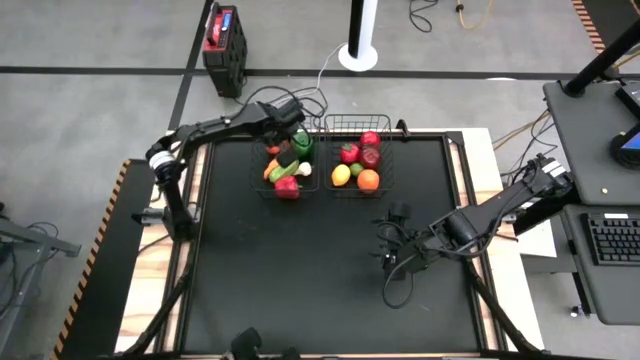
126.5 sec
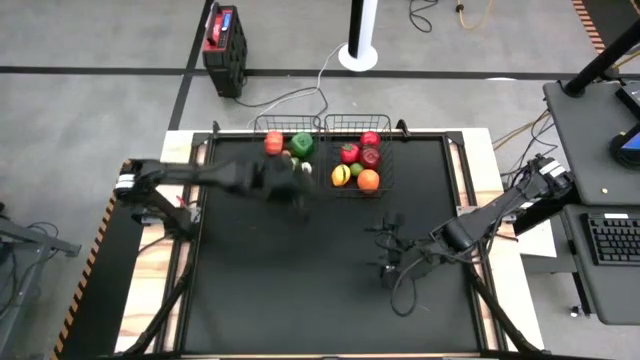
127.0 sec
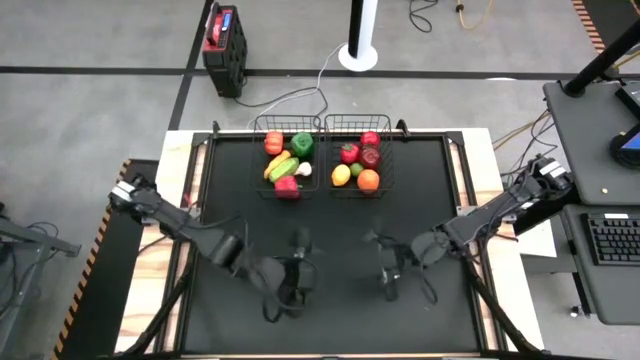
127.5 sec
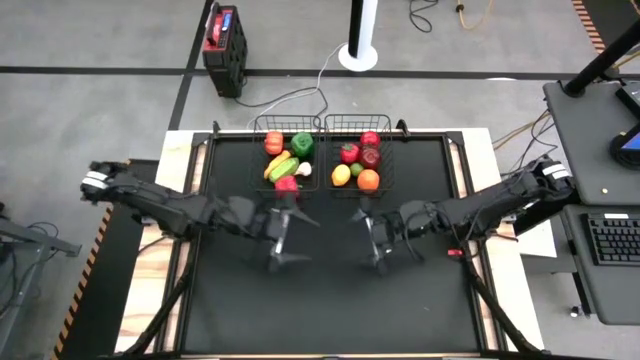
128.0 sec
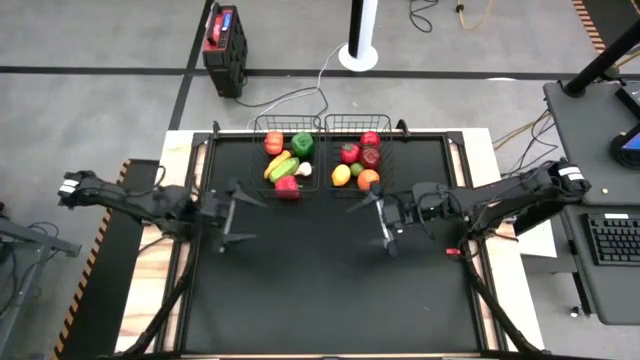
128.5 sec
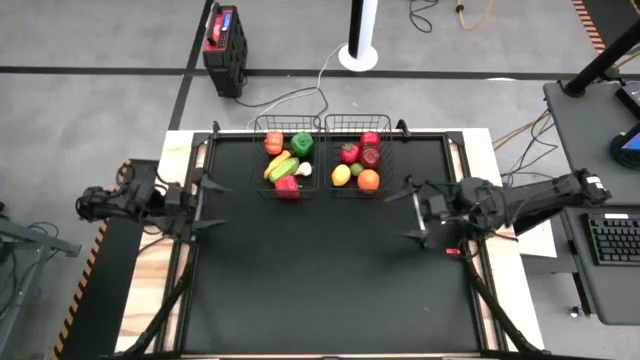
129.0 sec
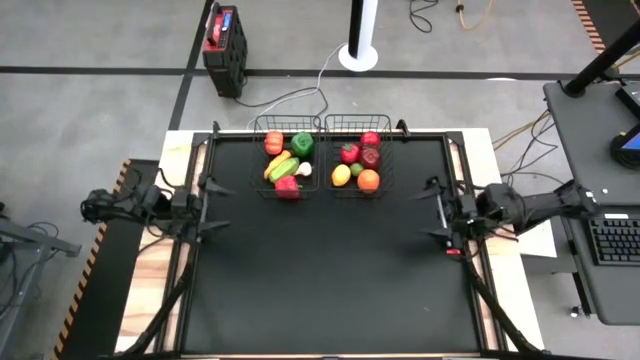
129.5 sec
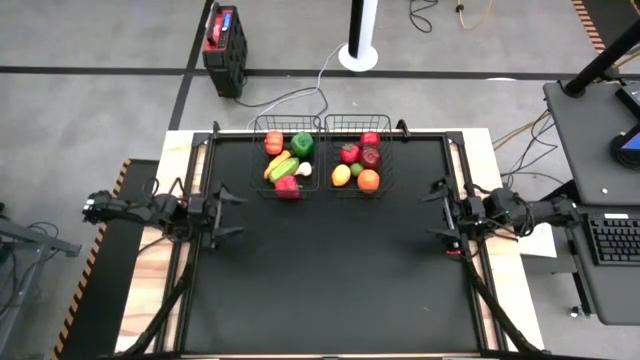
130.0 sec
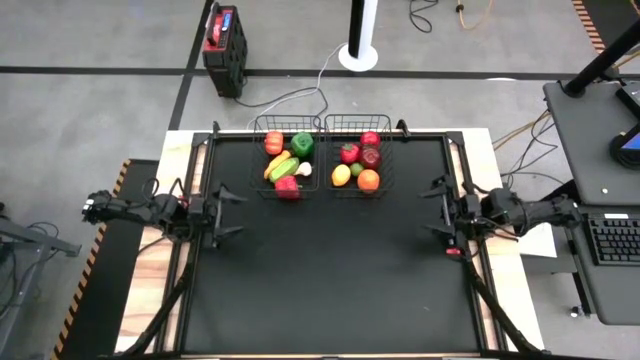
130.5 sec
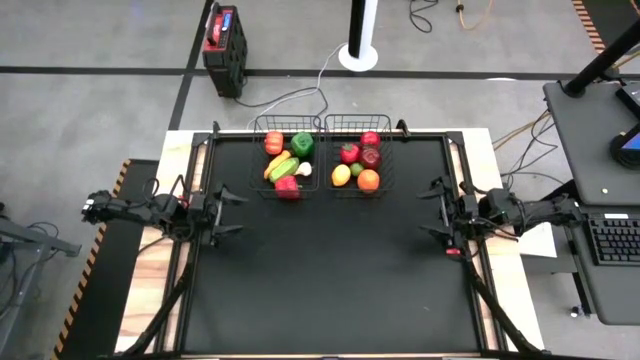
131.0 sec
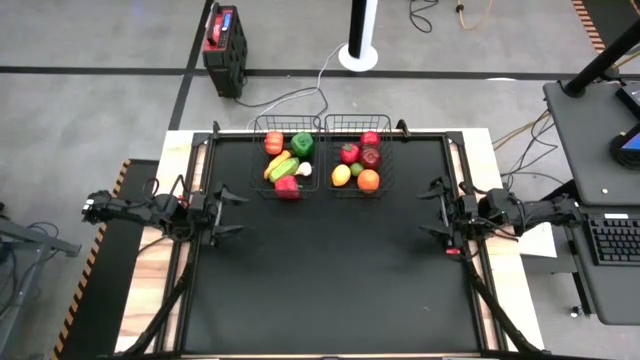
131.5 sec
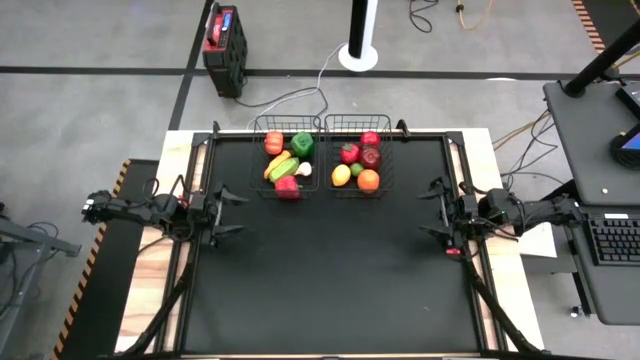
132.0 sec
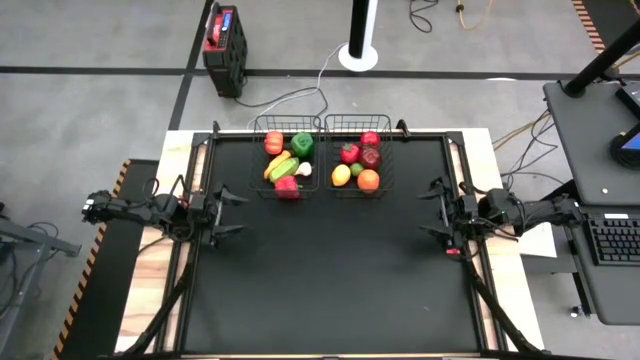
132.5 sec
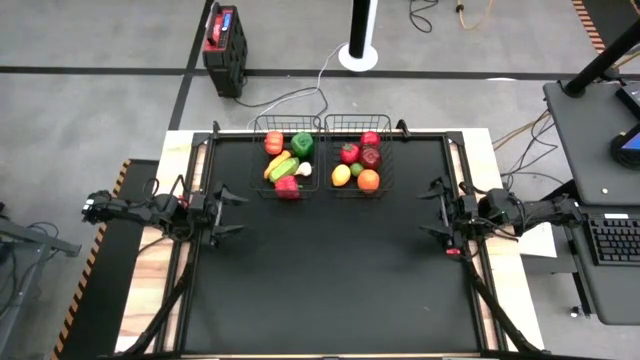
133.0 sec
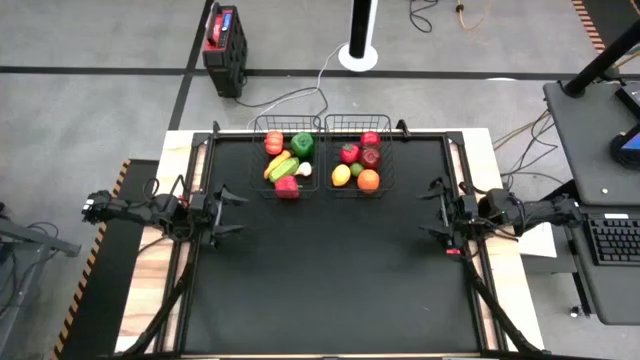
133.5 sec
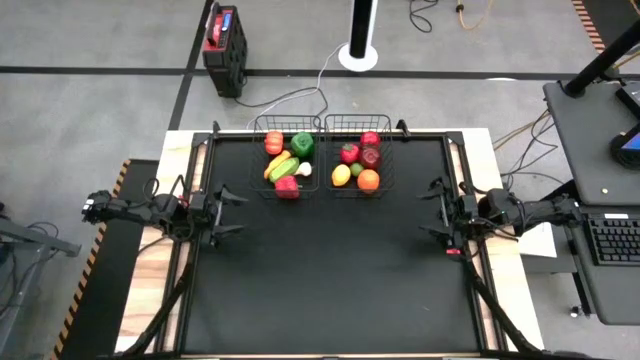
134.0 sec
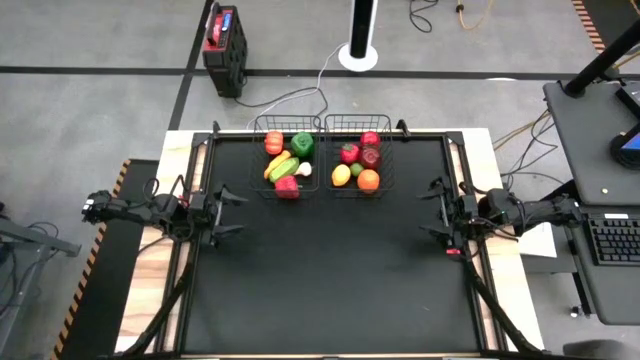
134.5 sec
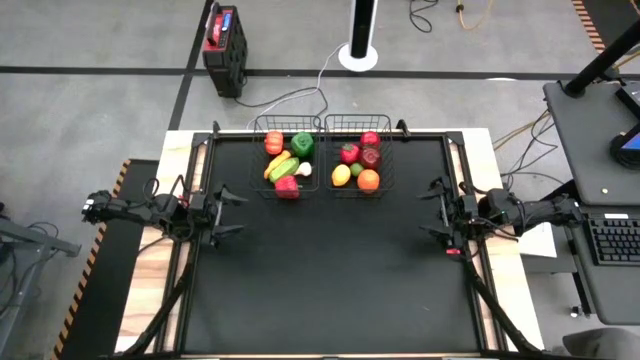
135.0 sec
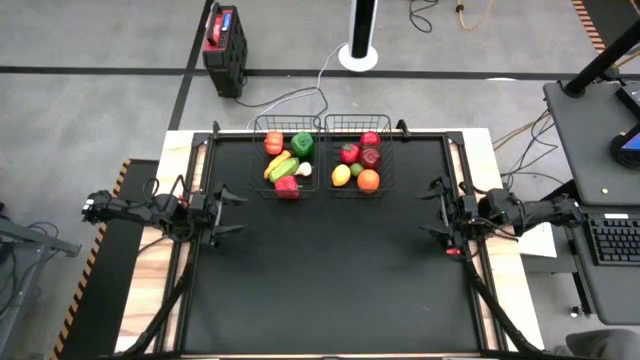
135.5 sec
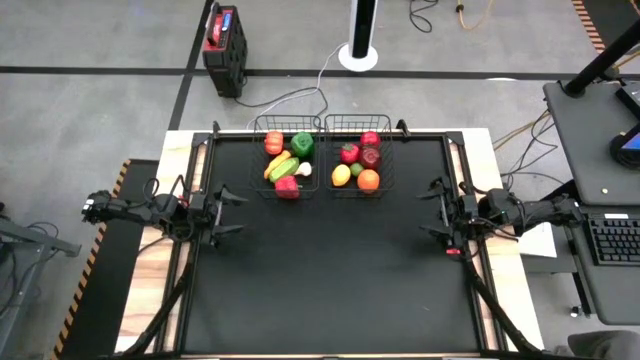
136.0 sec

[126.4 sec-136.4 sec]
Task: Sort produce into baskets
Return to Home Position

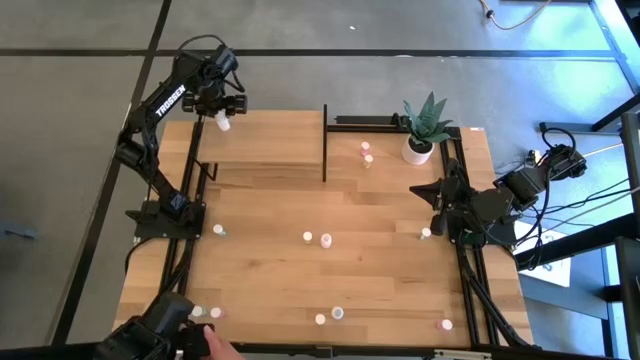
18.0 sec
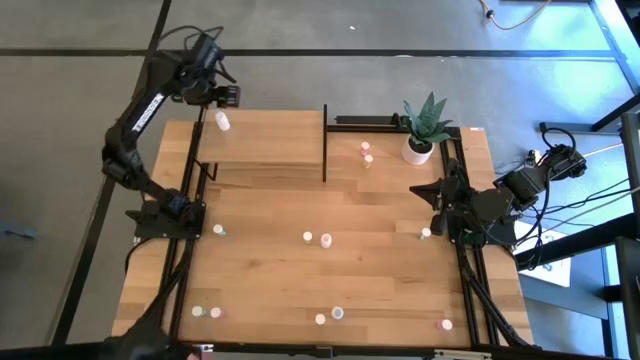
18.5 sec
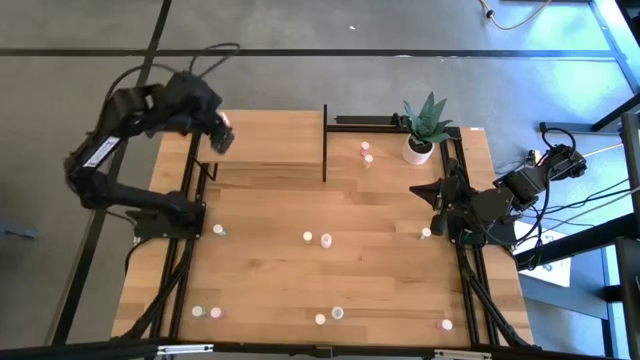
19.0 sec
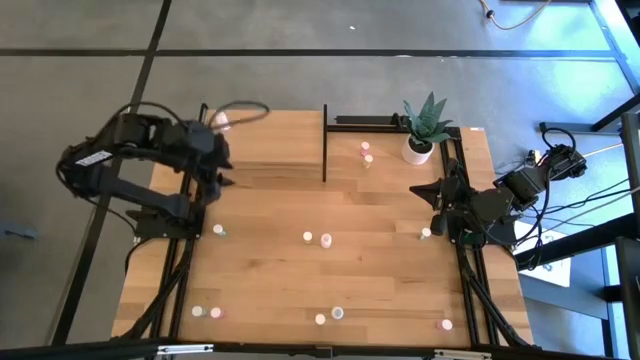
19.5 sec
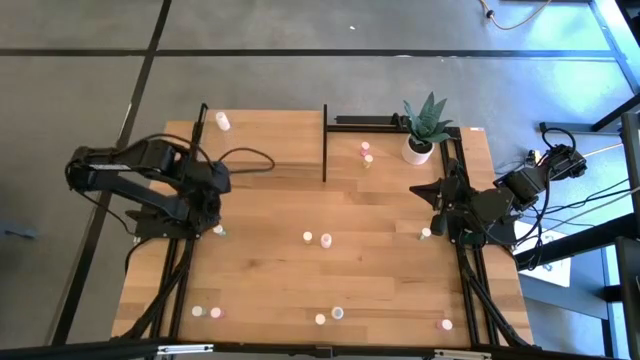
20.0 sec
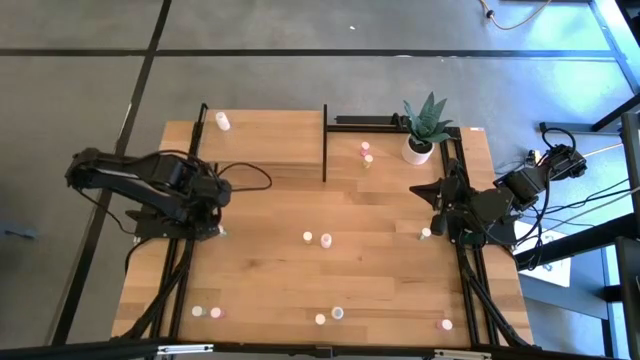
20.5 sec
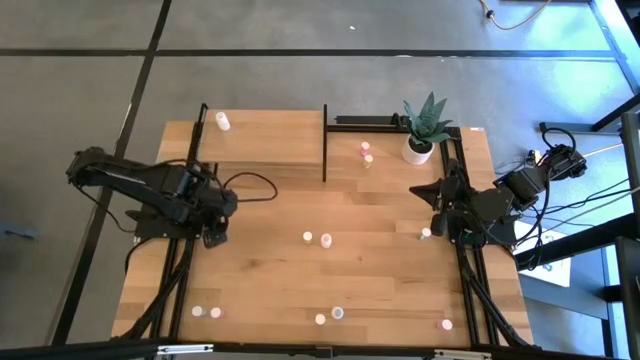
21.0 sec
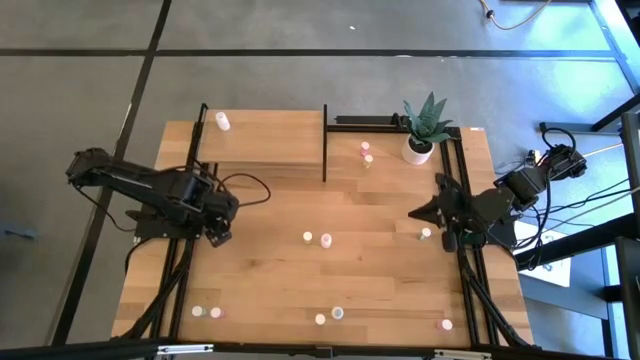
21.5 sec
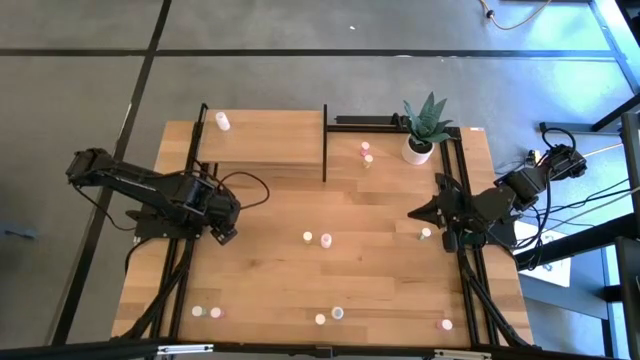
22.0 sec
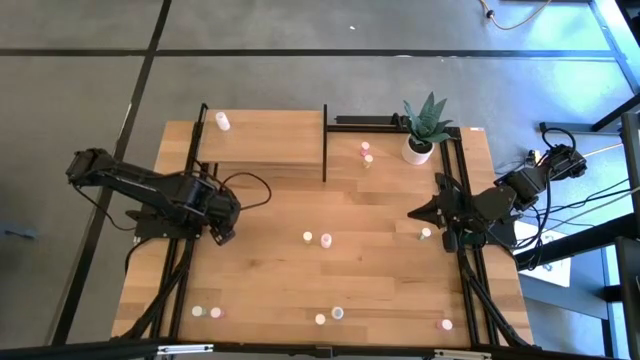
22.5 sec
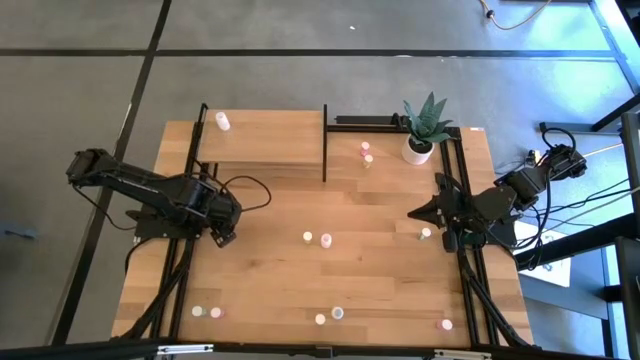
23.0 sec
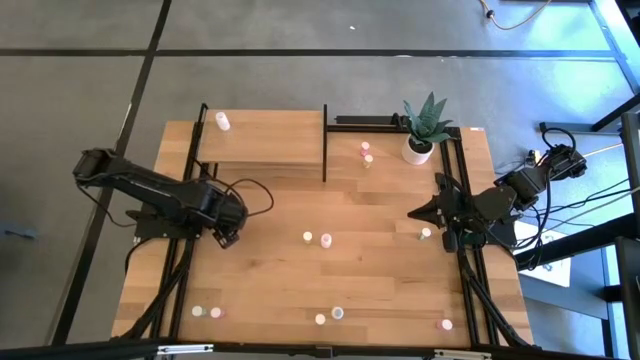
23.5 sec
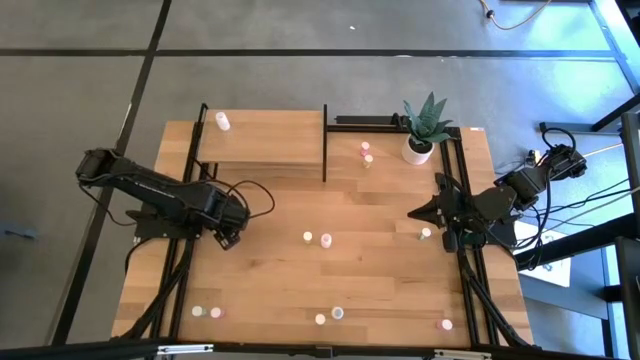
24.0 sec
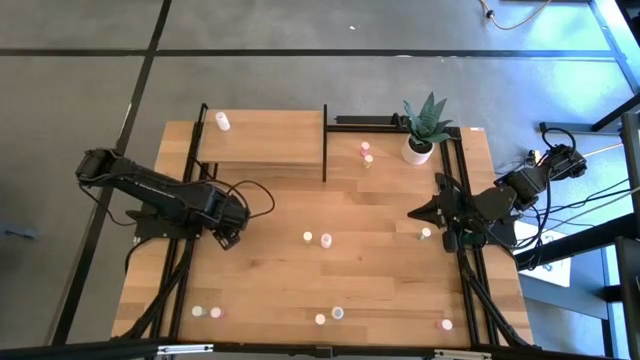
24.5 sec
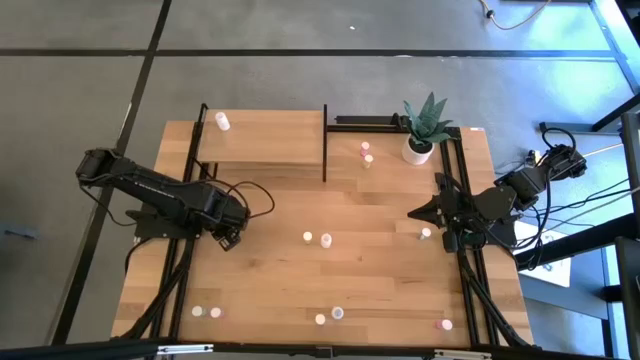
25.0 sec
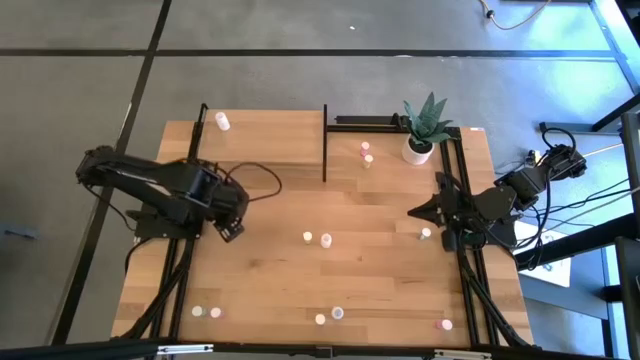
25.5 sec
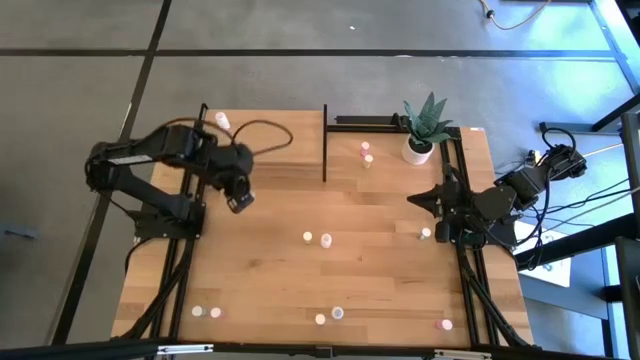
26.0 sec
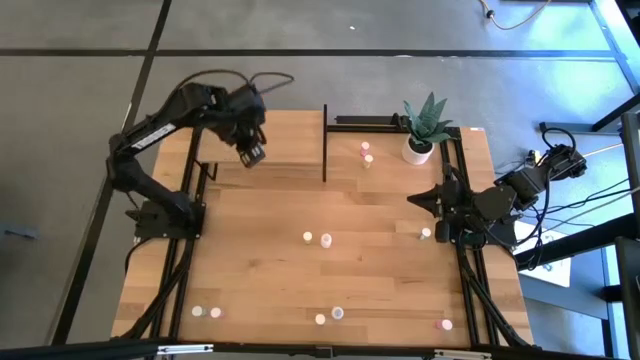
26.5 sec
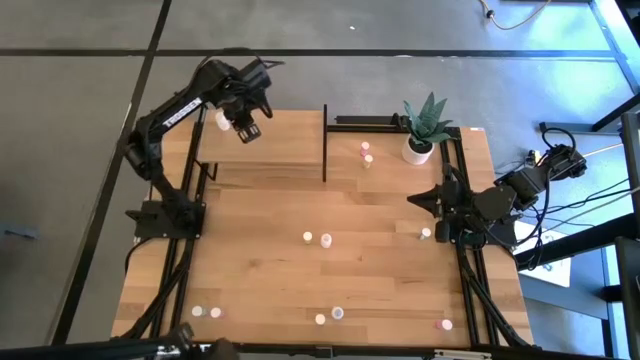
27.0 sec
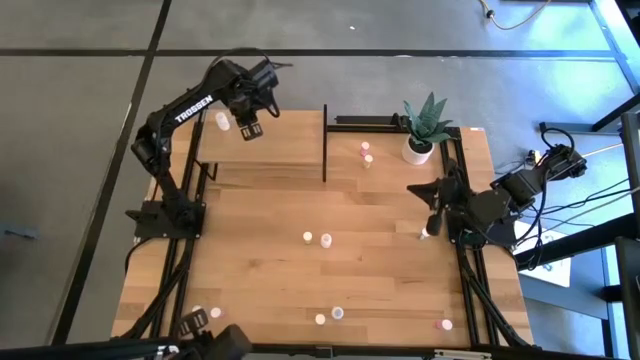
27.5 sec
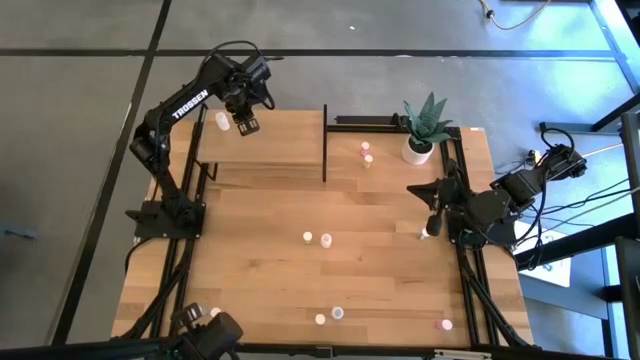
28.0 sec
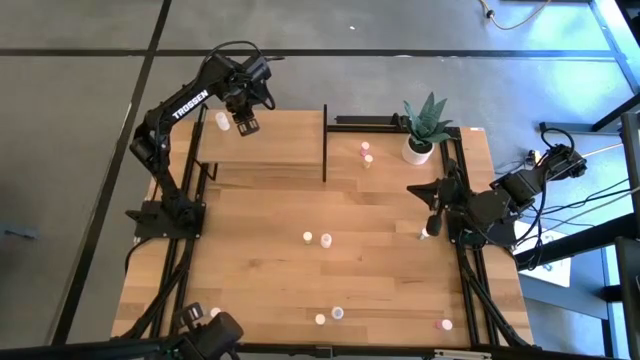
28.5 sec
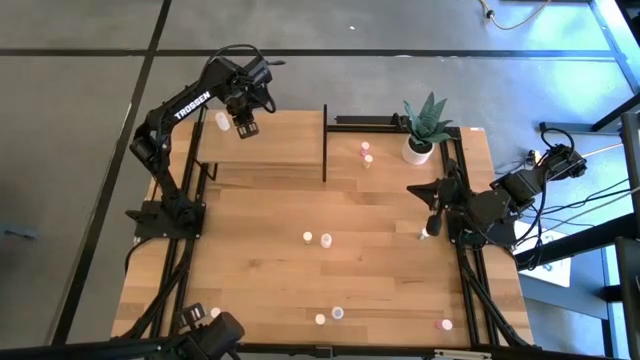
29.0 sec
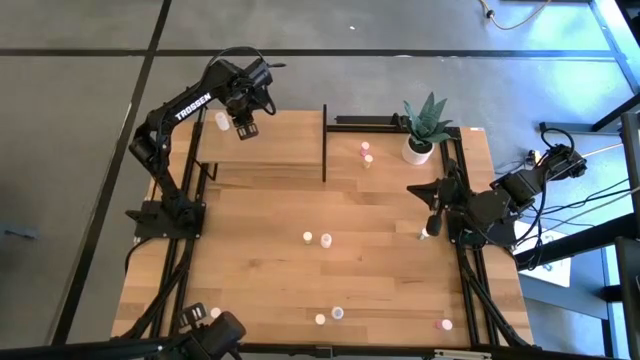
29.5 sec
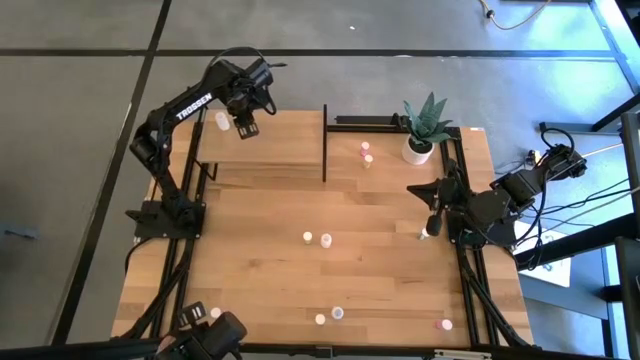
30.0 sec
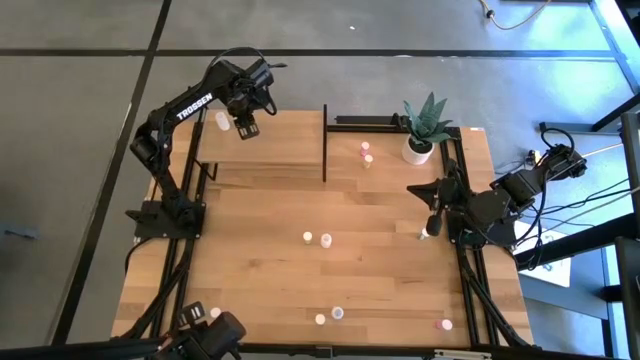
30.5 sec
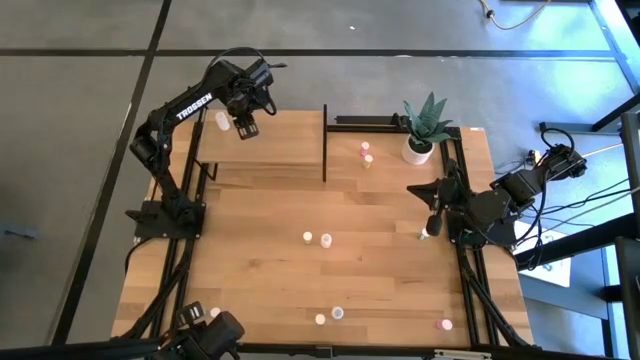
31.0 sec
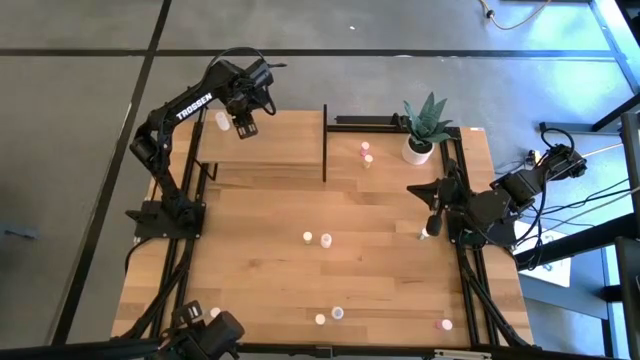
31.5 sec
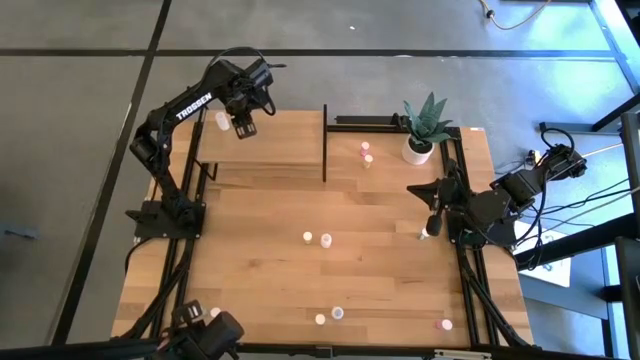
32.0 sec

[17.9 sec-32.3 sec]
Task: Pick and place medicine bottles onto shelf by color
Put the top left blue pill bottle on the shelf
